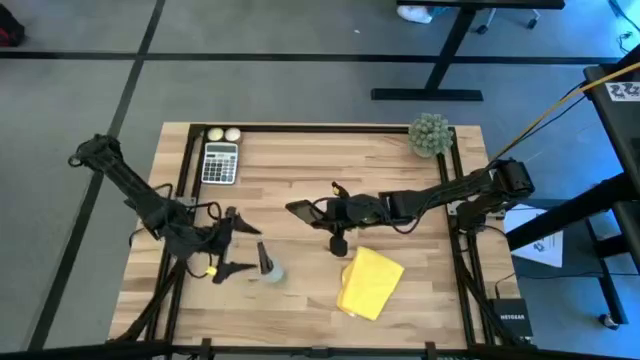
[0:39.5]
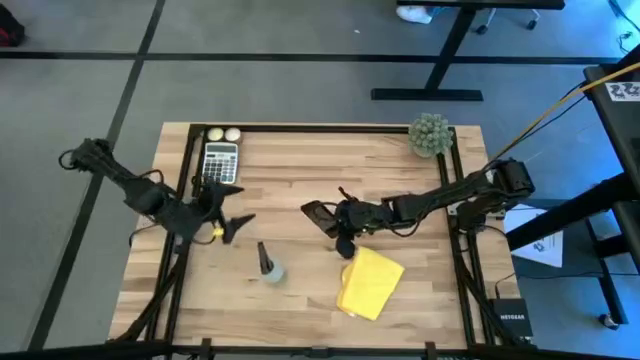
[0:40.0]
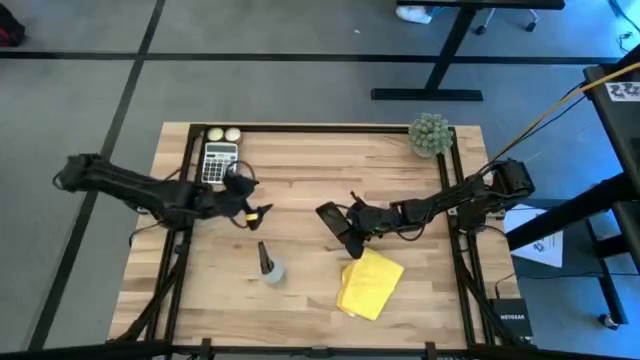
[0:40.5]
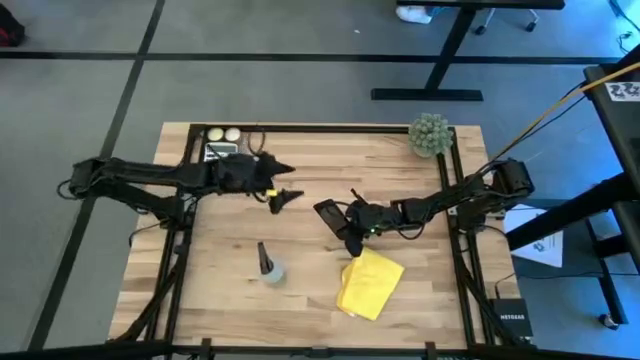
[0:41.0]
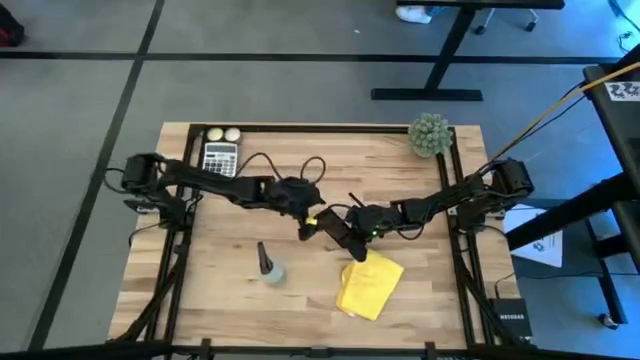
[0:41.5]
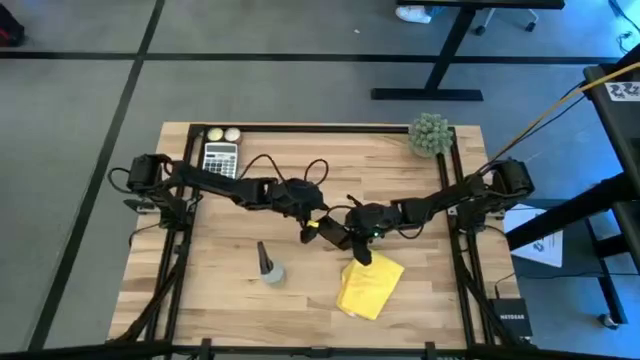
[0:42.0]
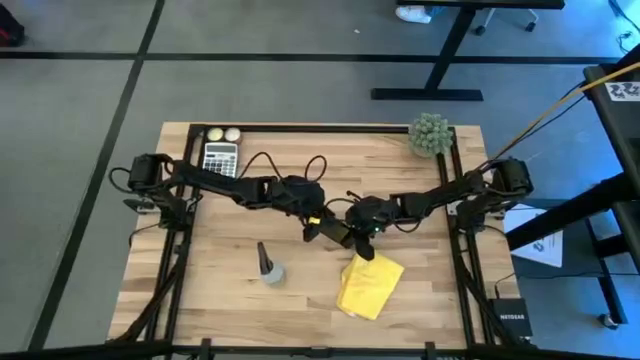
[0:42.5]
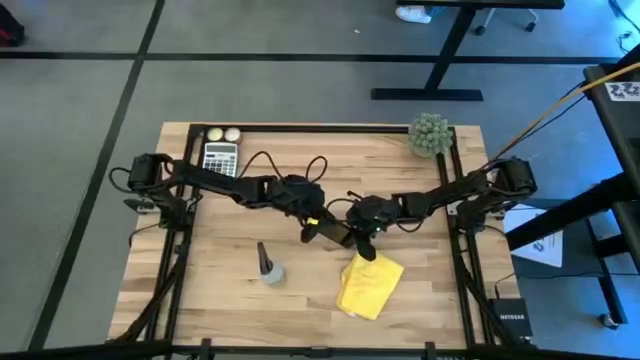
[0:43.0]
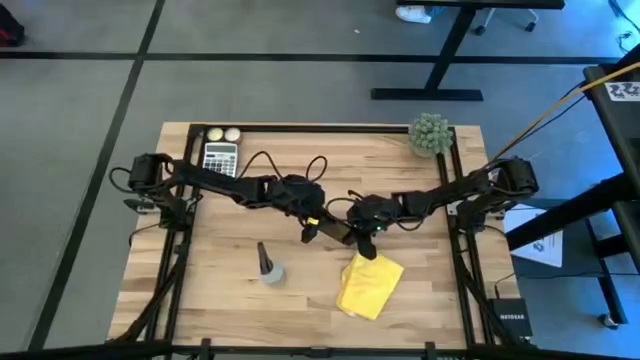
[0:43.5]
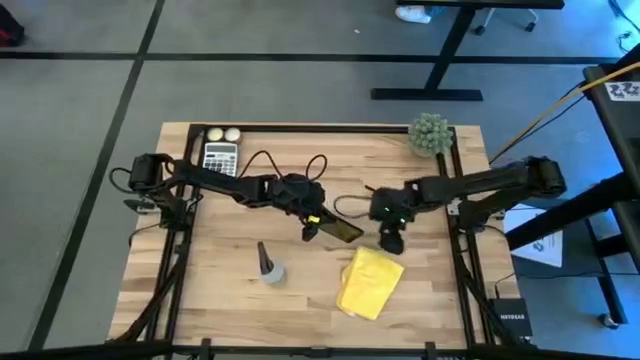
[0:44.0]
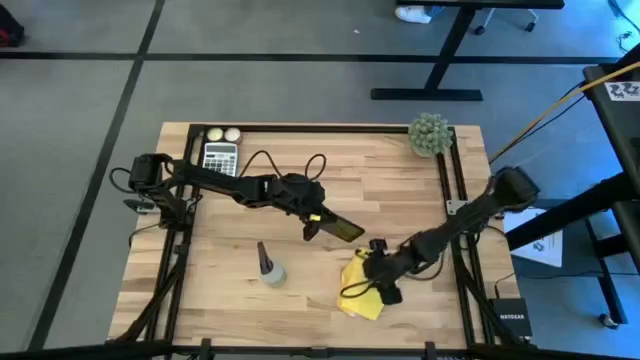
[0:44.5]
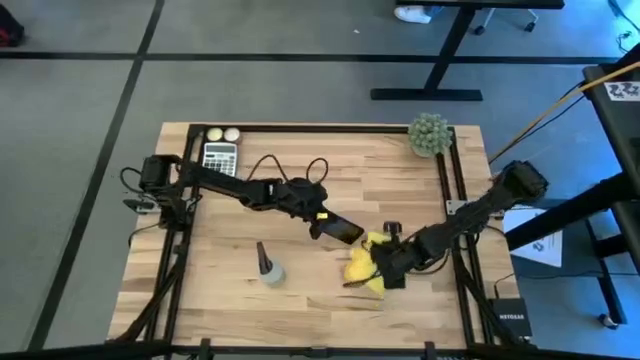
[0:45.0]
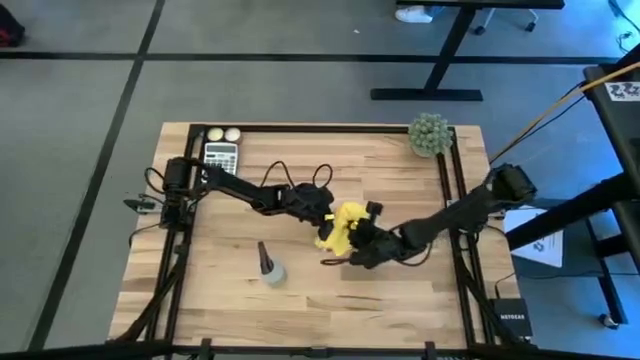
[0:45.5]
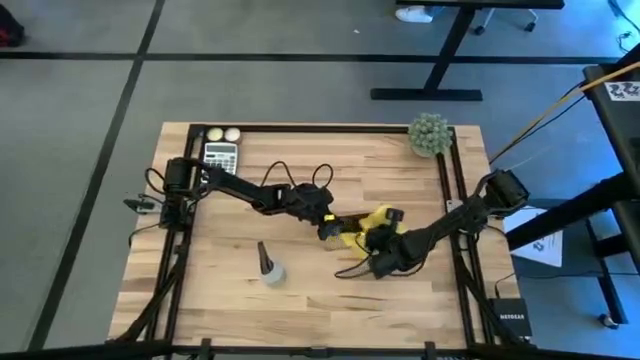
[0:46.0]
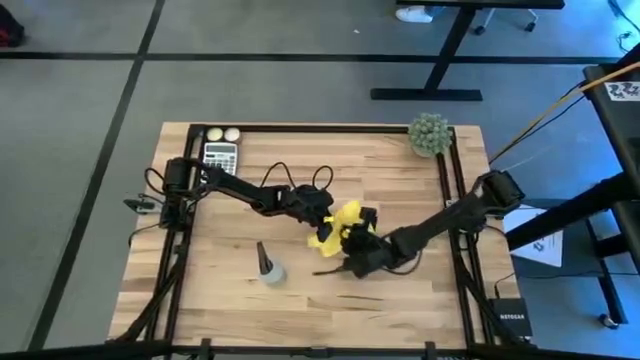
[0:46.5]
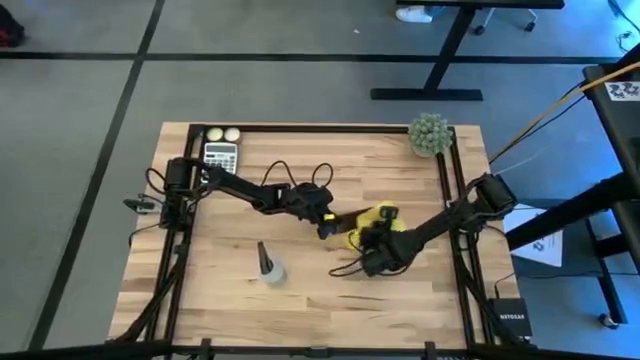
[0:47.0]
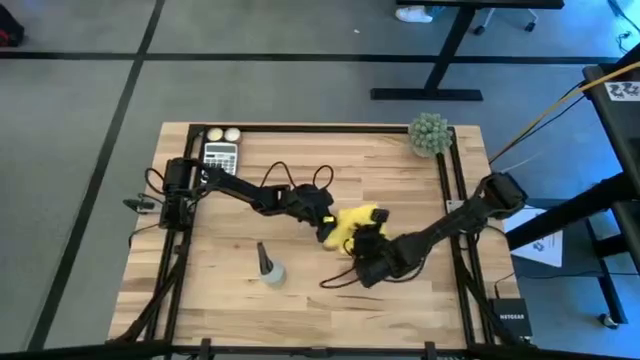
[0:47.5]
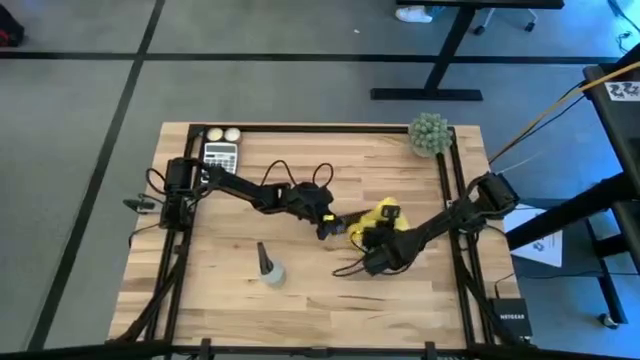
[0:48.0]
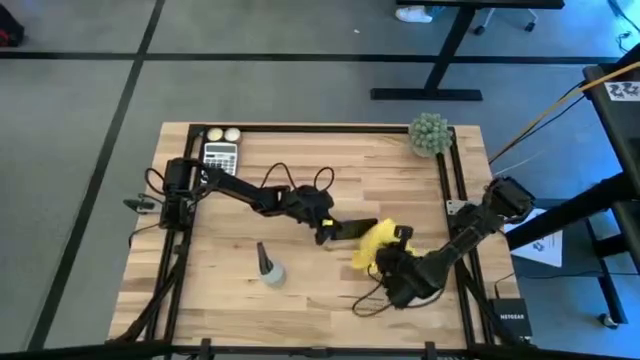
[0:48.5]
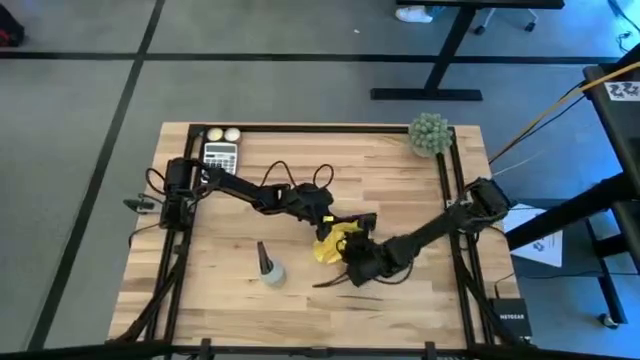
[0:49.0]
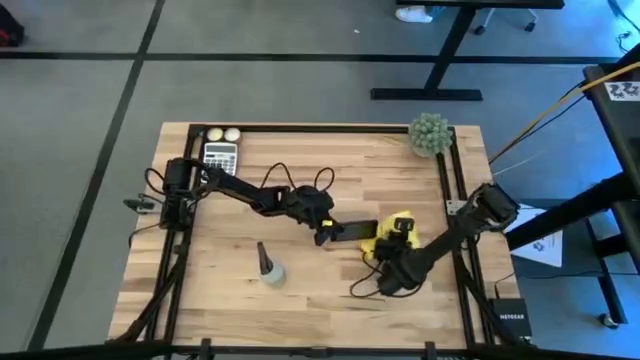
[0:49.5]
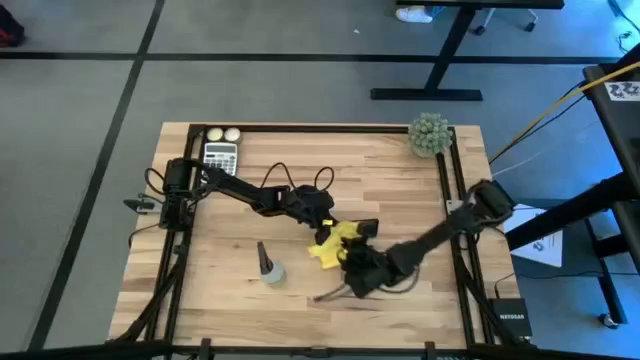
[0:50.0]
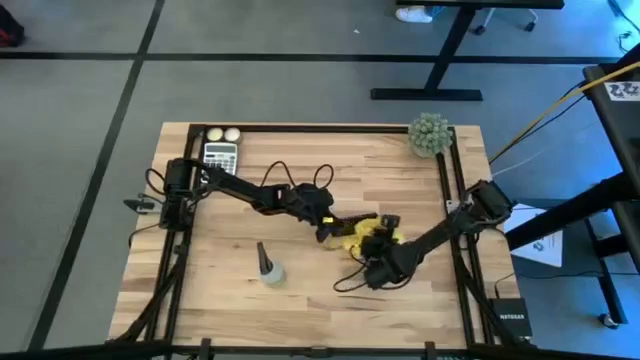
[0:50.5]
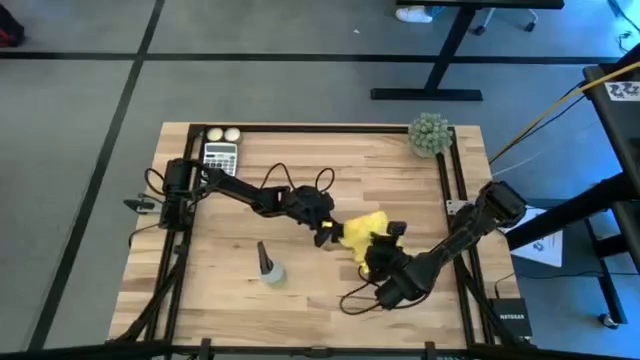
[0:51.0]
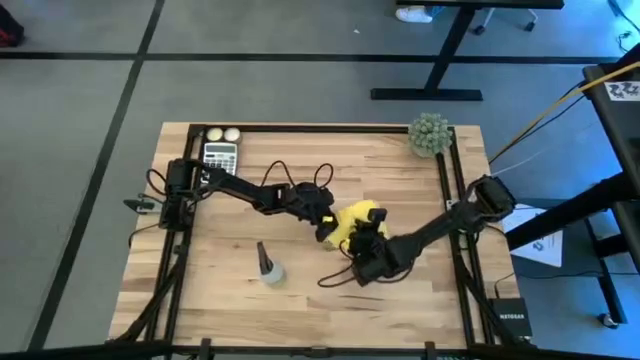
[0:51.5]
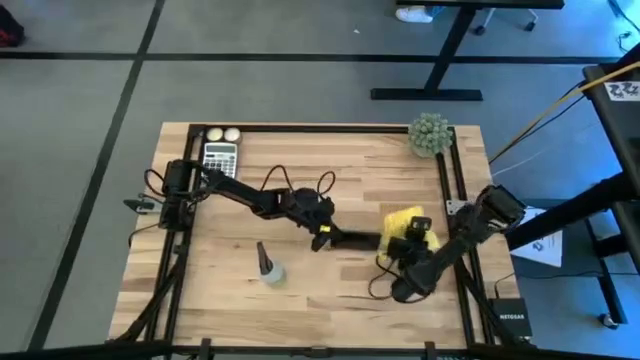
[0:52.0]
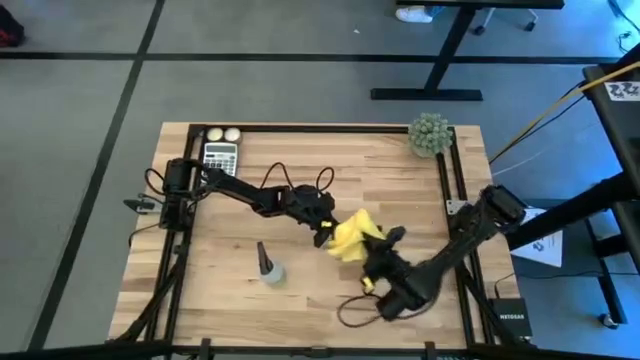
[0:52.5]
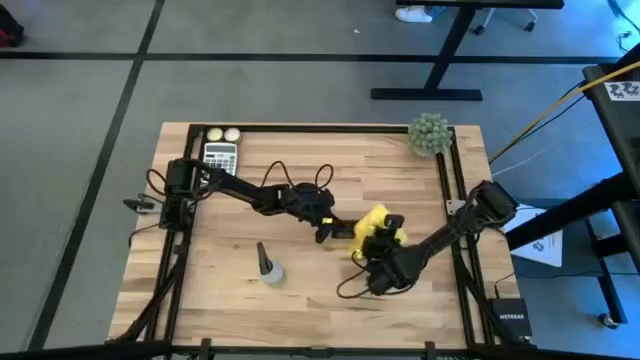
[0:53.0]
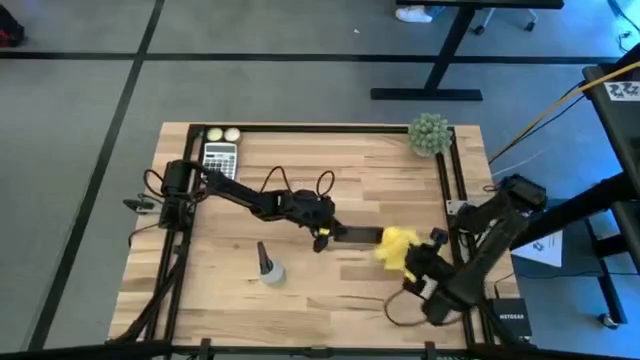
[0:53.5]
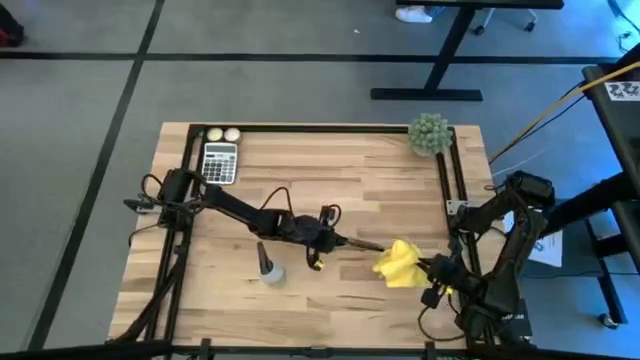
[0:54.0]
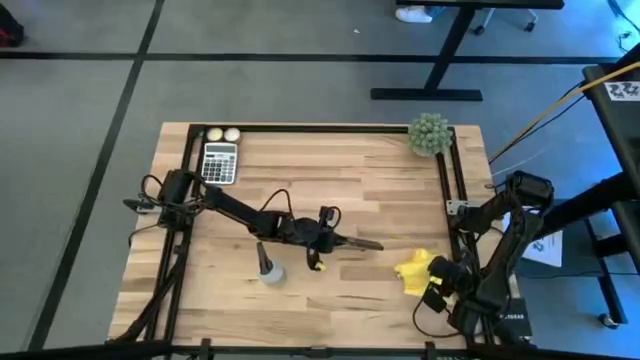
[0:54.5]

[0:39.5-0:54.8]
Task: Apply microfiber cloth
Wipe the front of the black cellphone with the yellow microfiber cloth

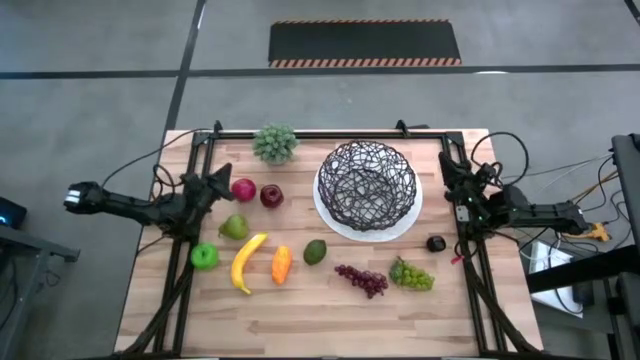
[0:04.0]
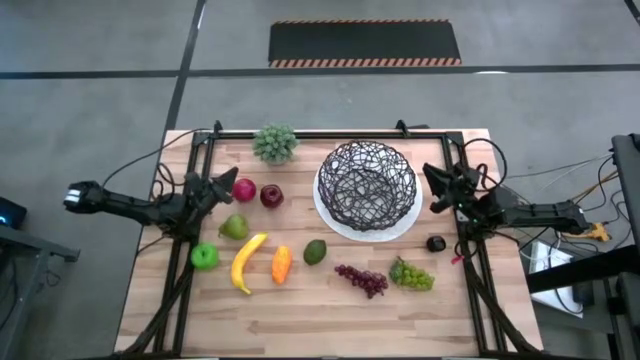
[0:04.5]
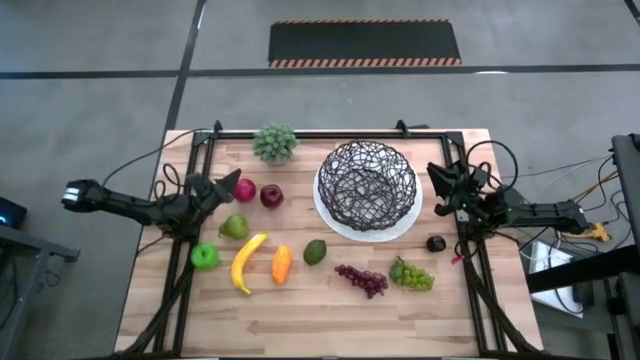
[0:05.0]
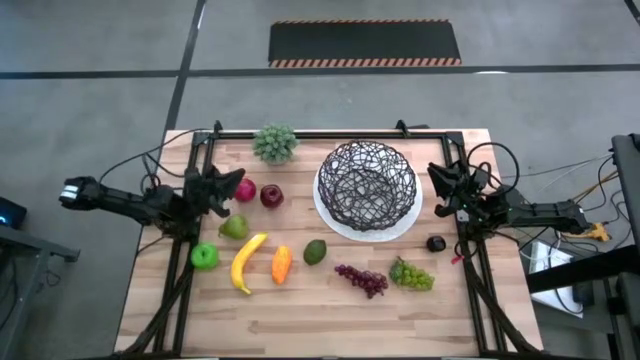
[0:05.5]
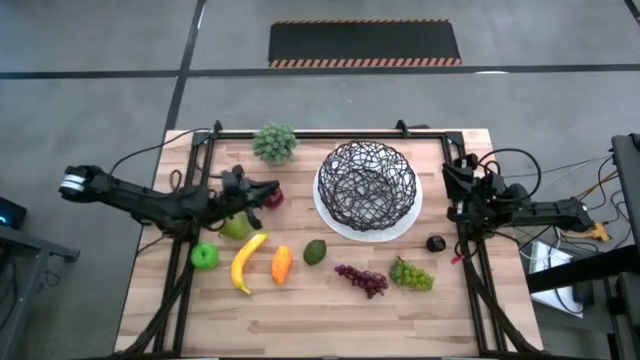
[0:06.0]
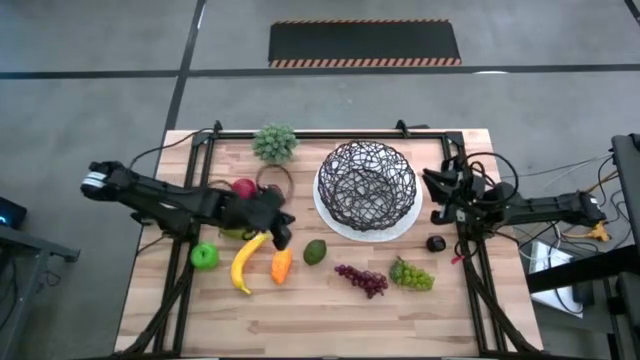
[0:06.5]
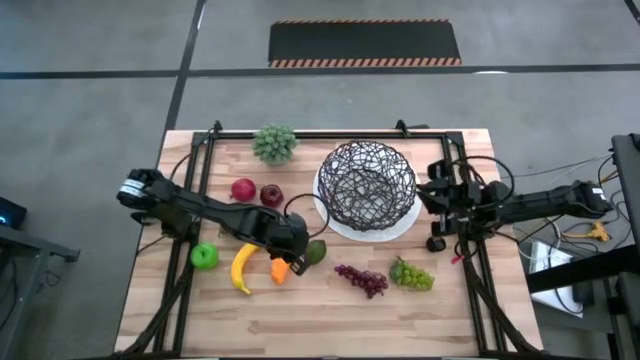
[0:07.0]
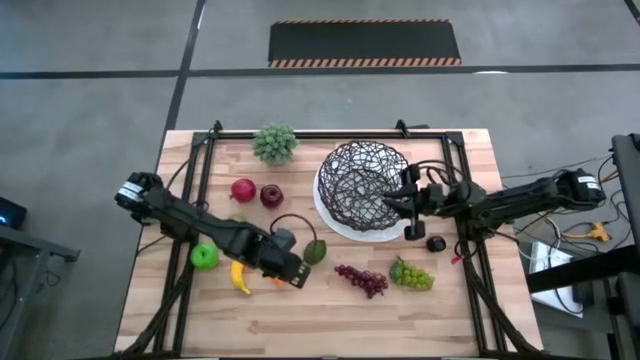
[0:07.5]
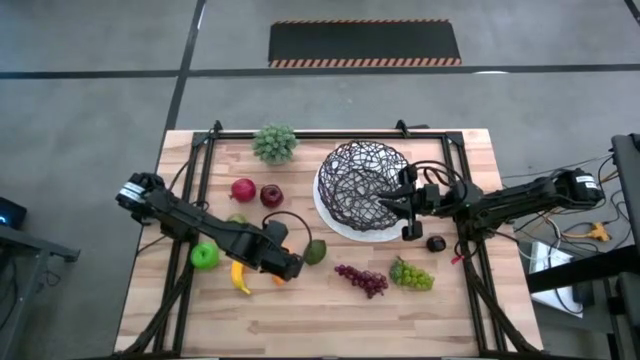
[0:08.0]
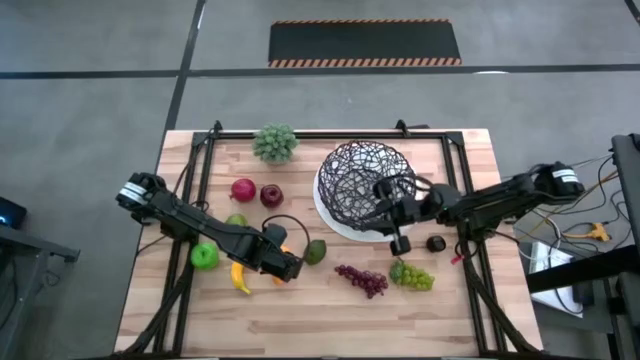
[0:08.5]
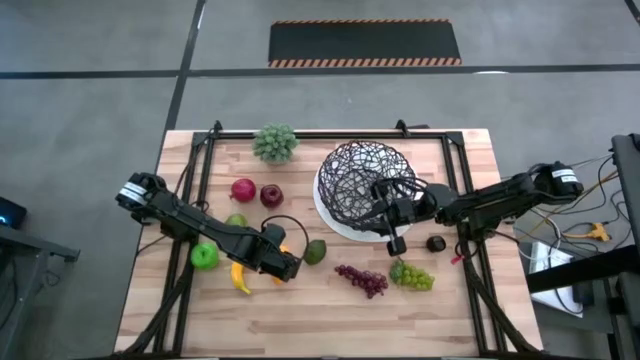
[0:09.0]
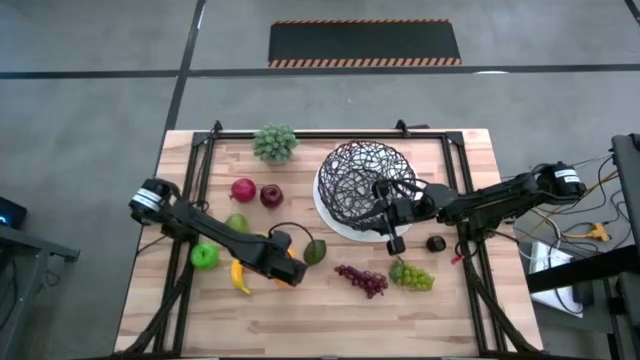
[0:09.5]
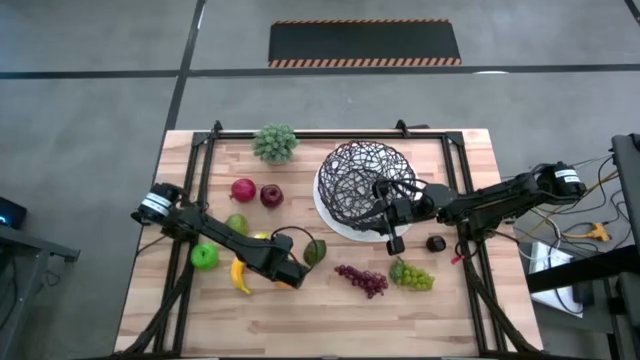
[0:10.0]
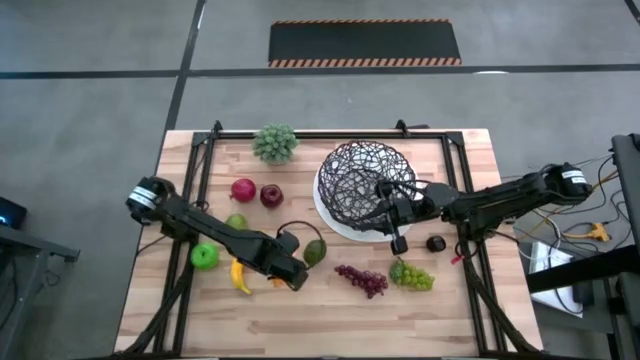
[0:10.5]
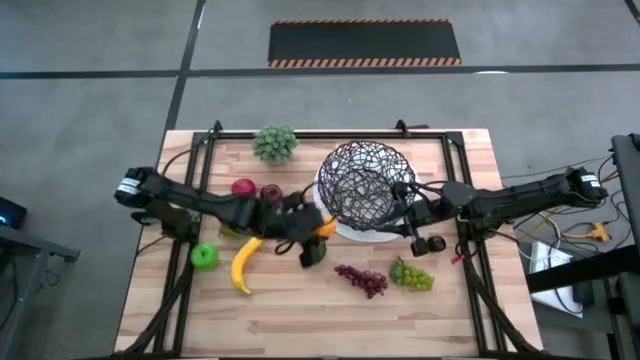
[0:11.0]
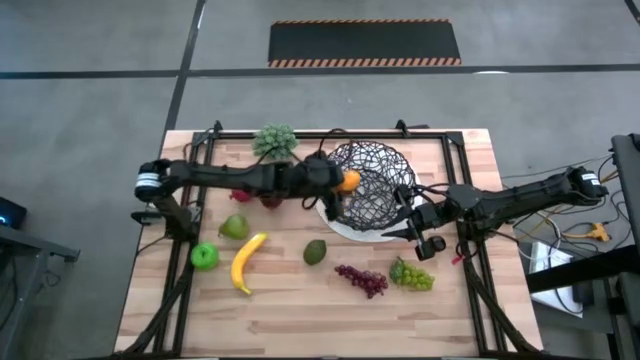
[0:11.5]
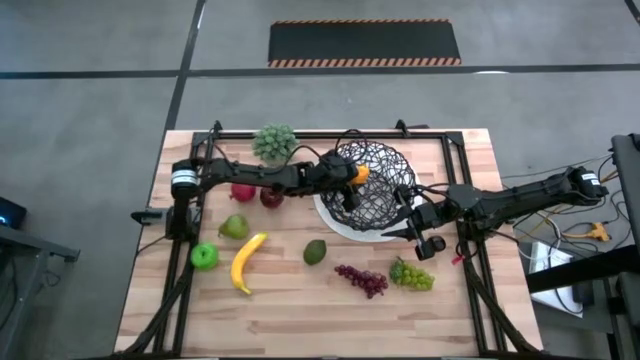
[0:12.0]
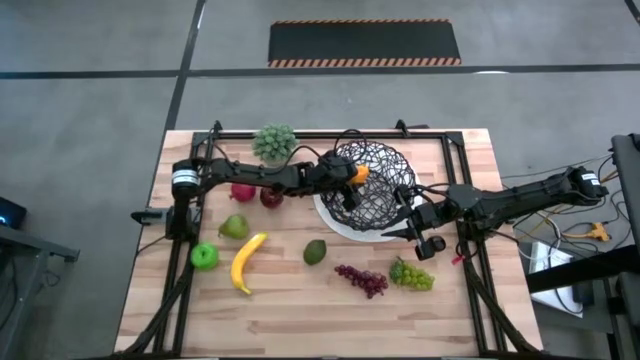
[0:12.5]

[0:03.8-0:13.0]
Task: Build produce basket
Put the yellow mango into the black wire basket
